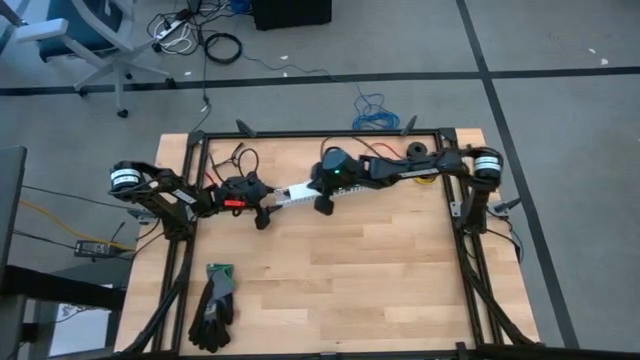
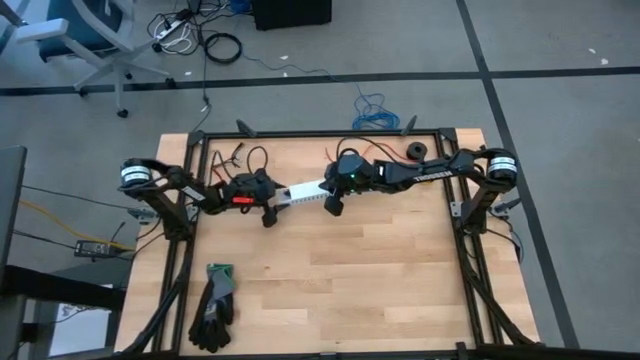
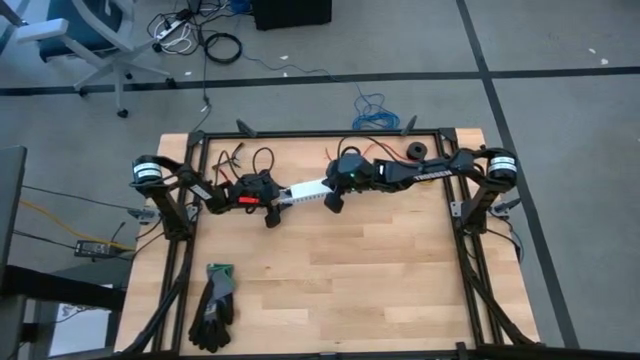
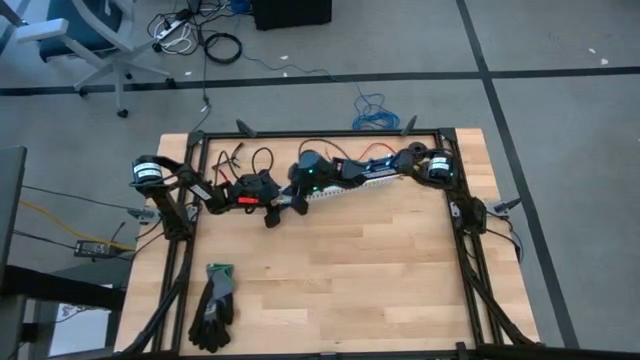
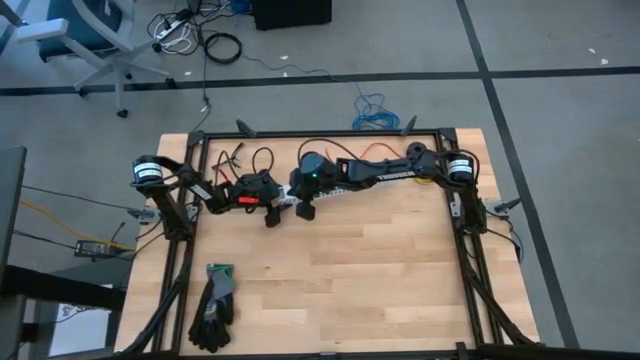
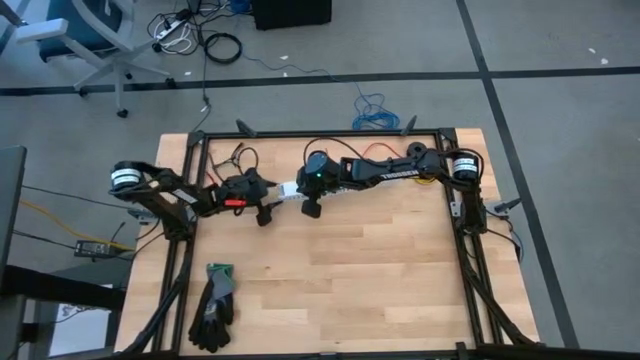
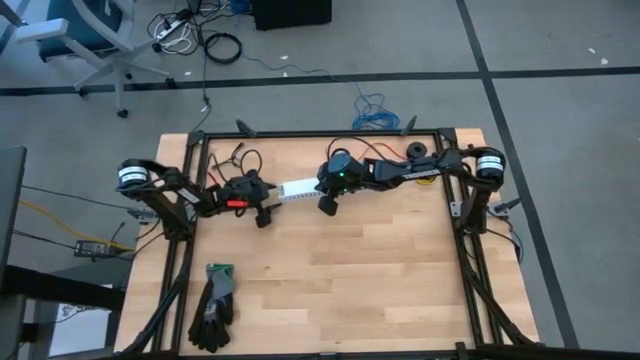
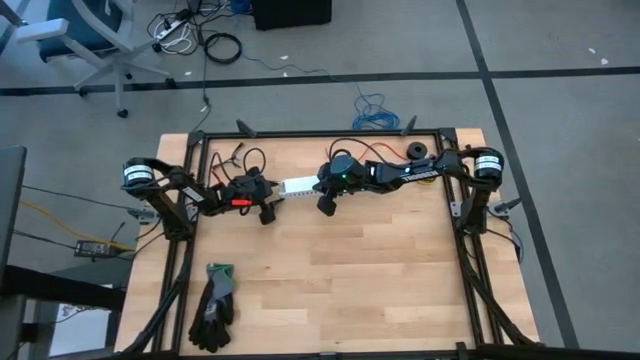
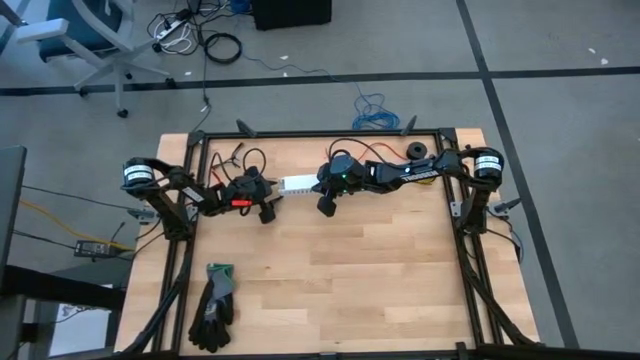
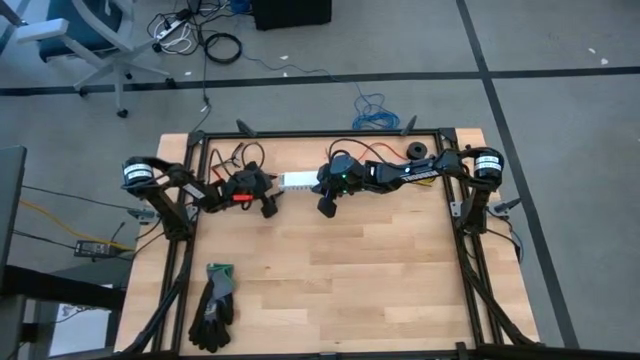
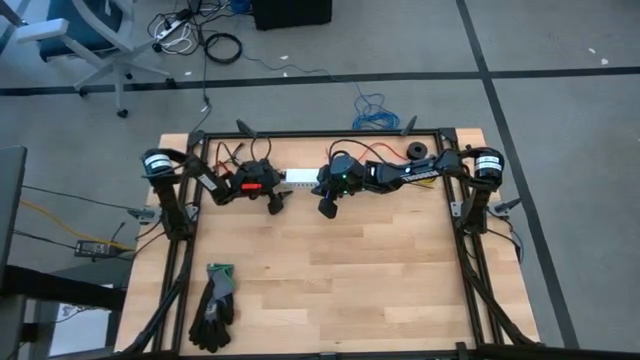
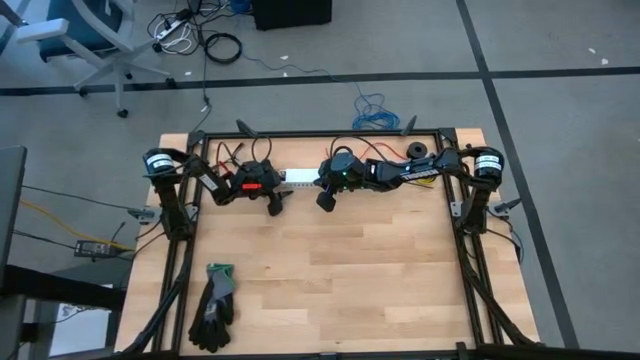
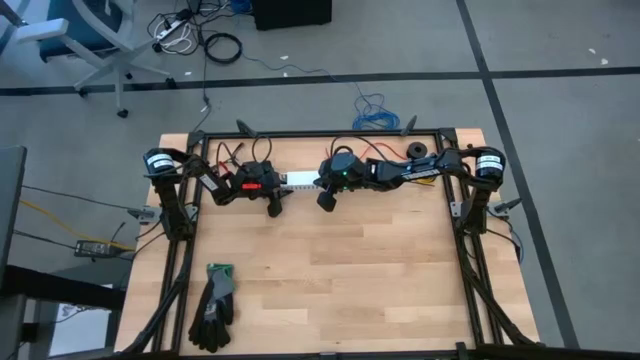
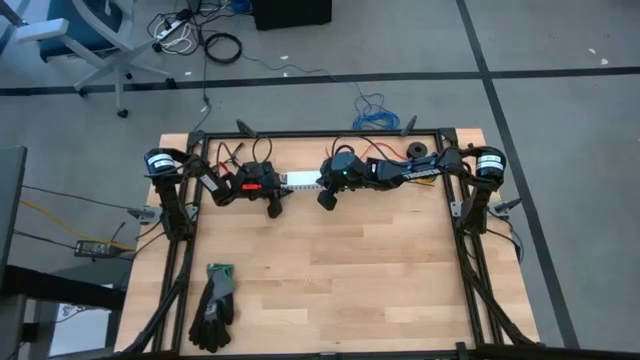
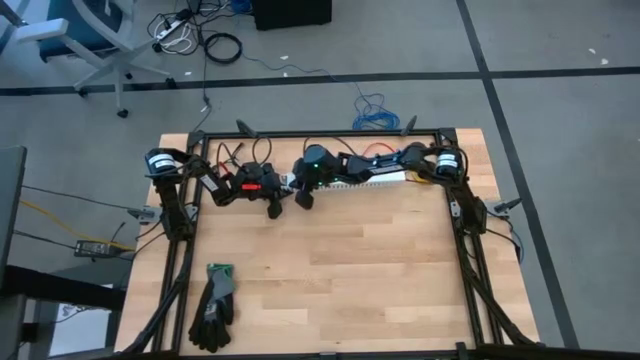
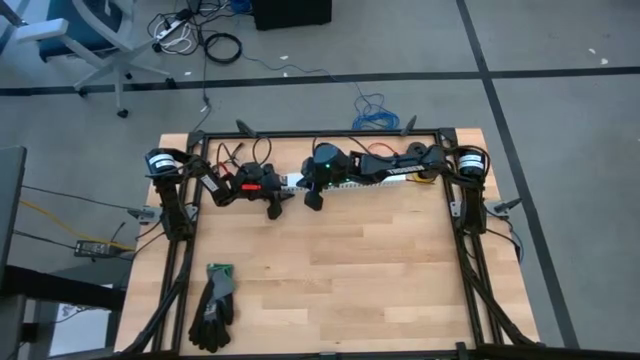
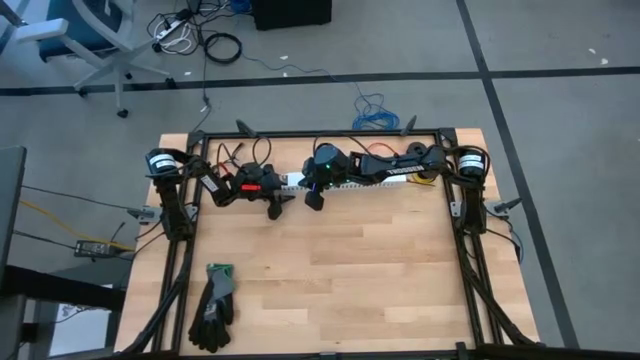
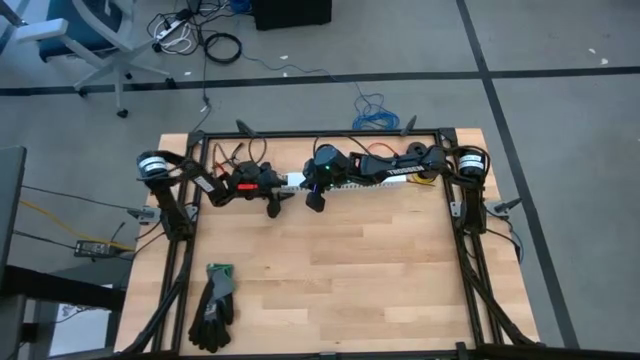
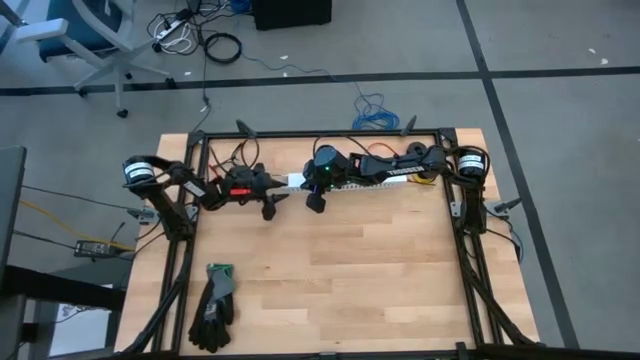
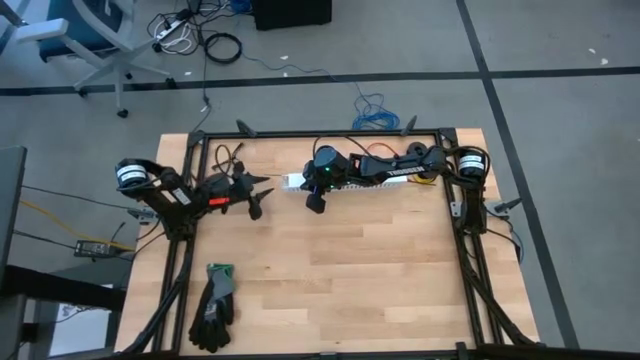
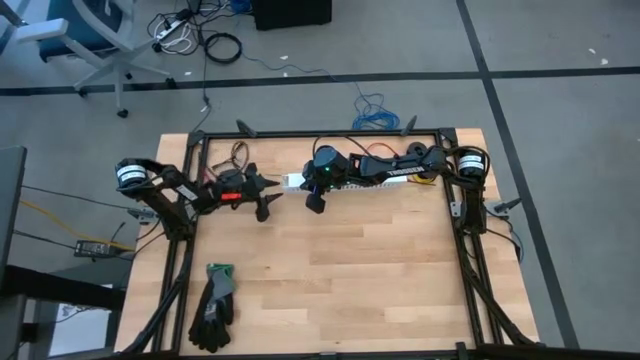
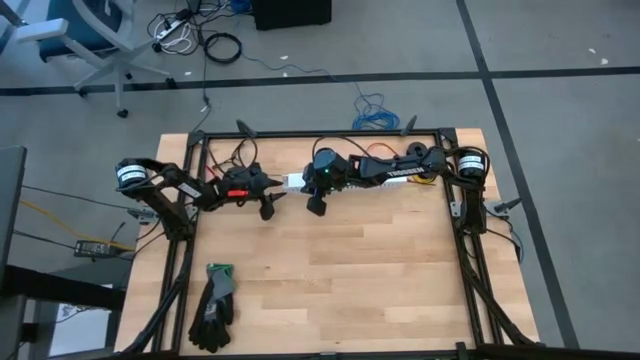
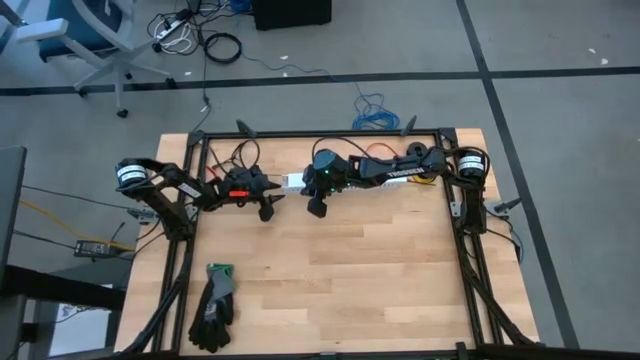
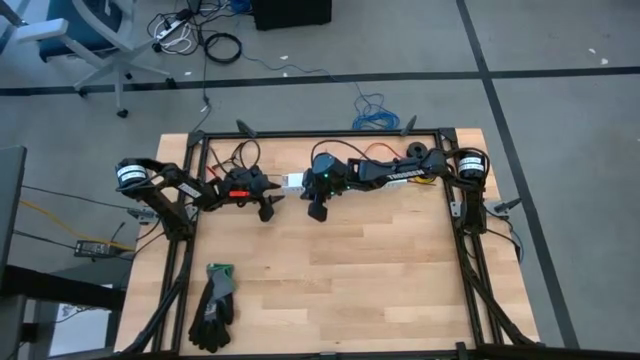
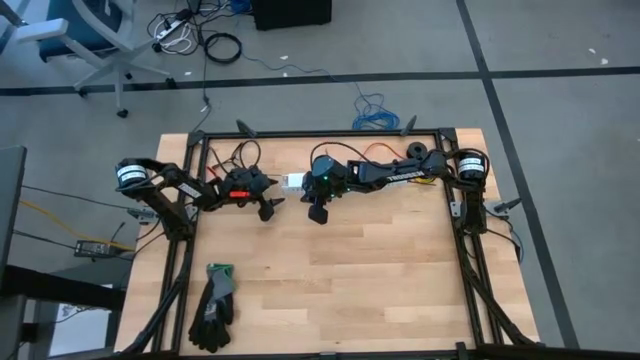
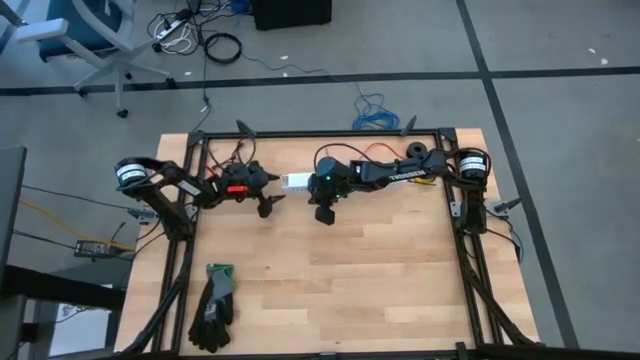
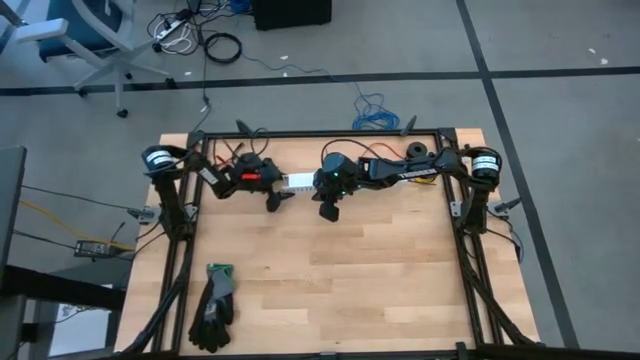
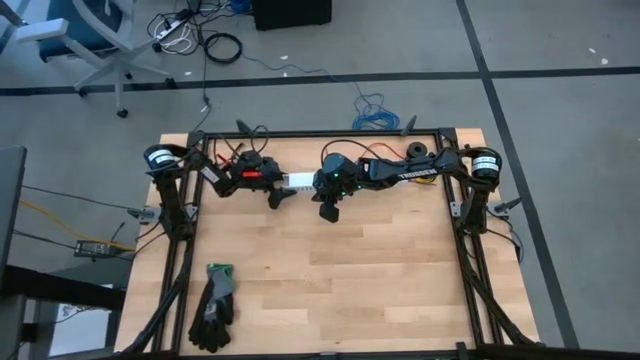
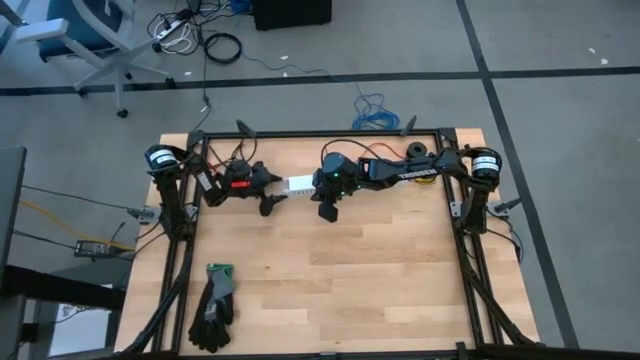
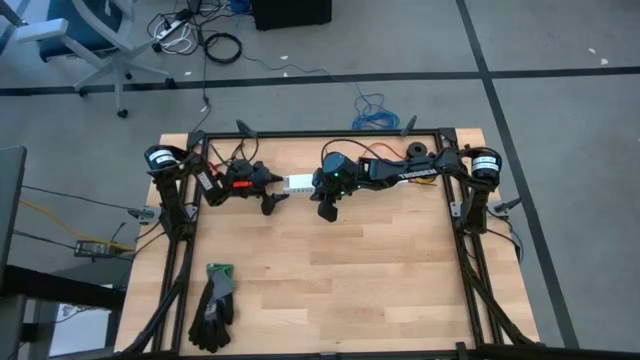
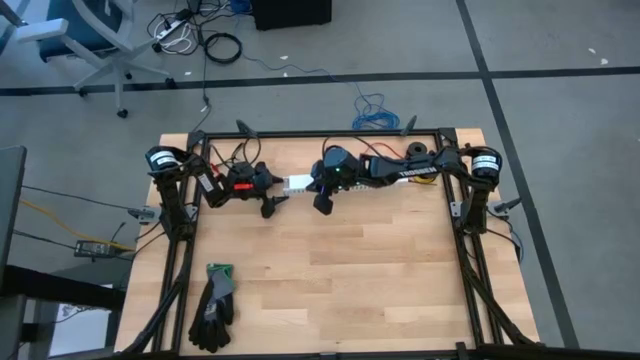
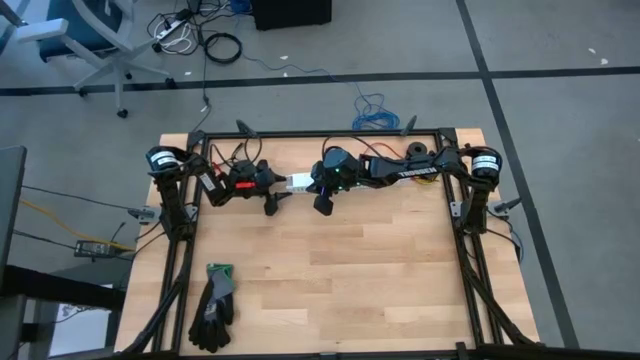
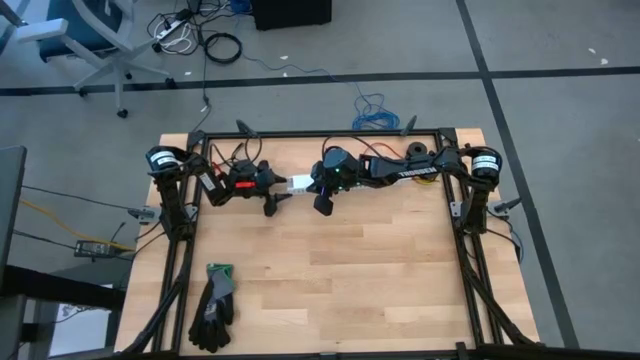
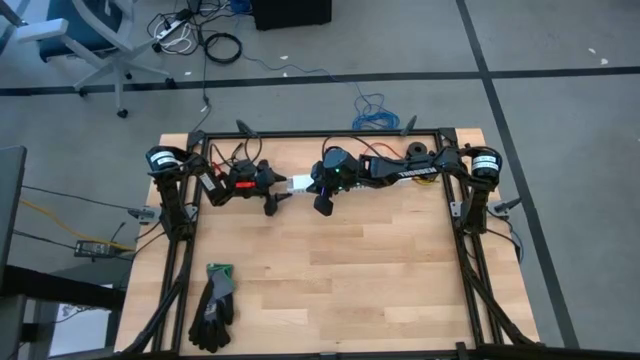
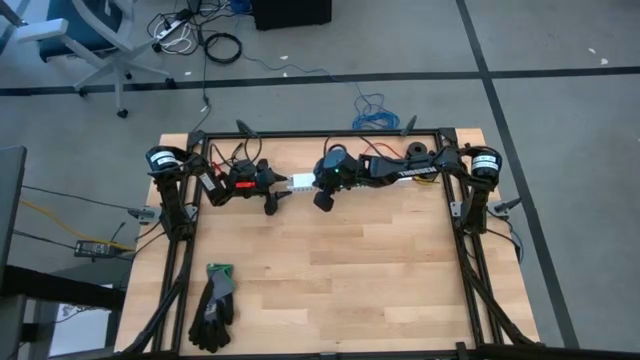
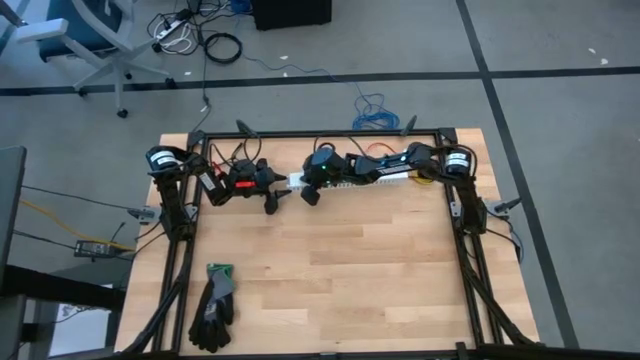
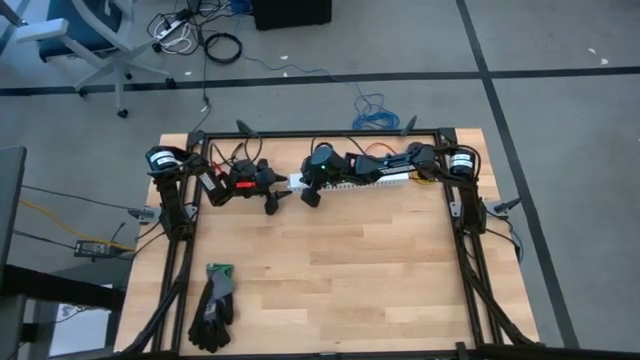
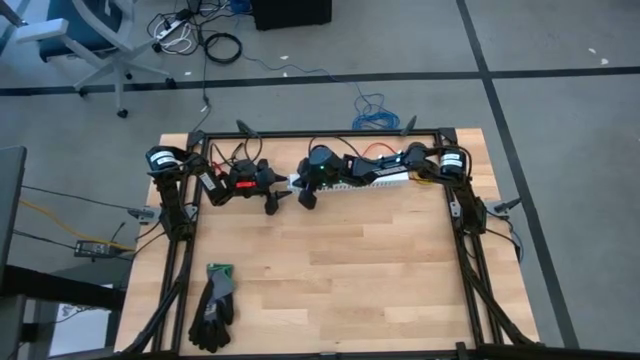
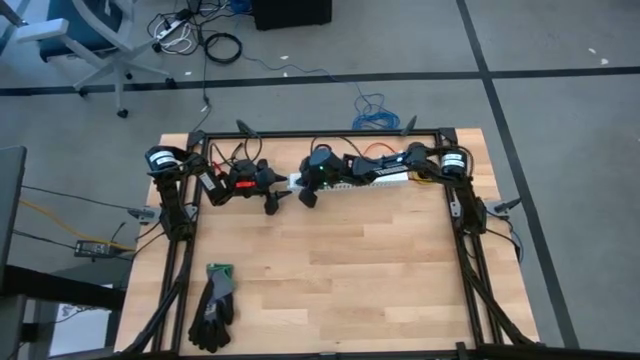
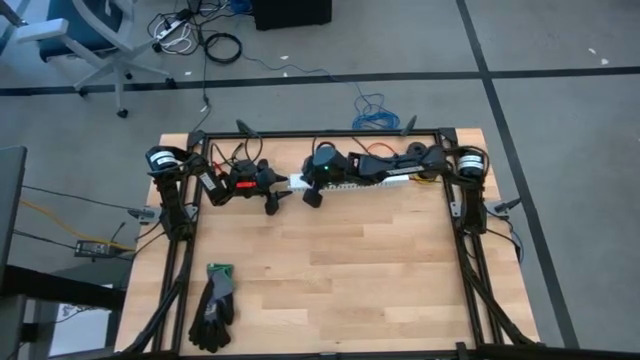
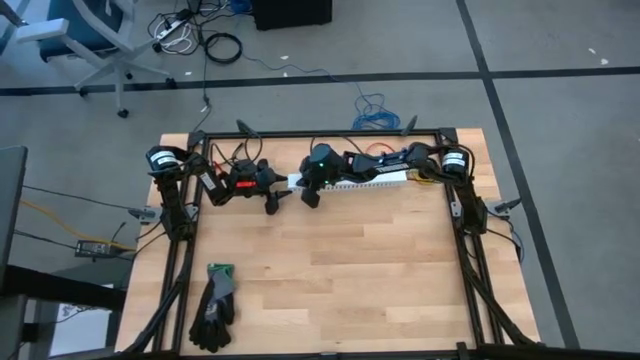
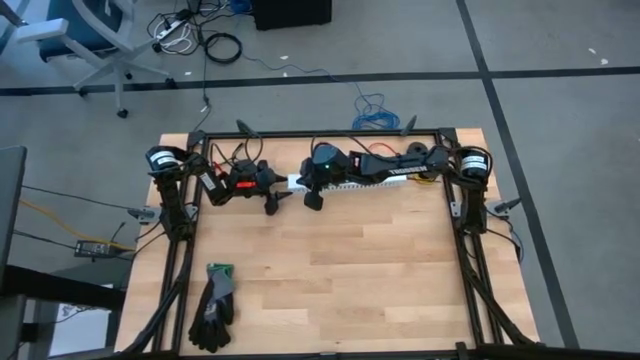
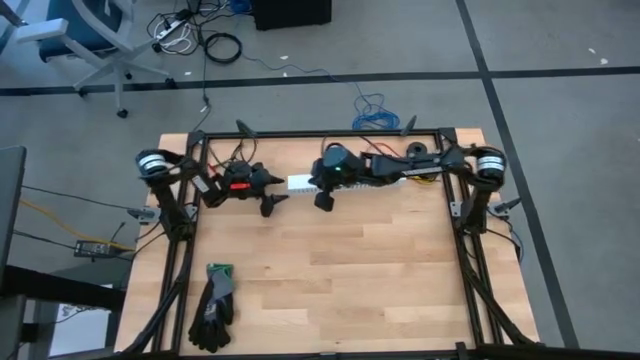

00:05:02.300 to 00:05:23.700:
Task: Ziptie cables
Close the cable duct with the cable duct lid
